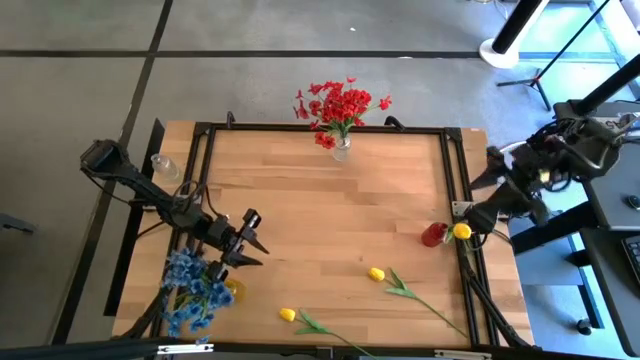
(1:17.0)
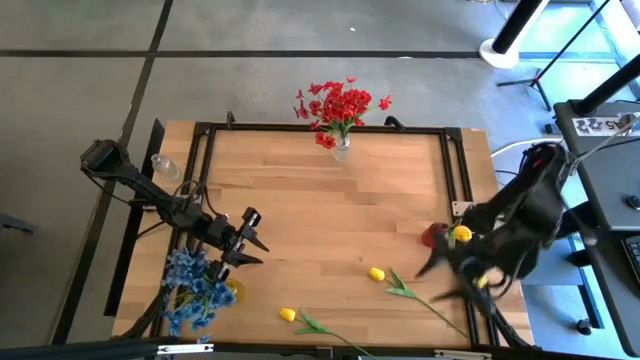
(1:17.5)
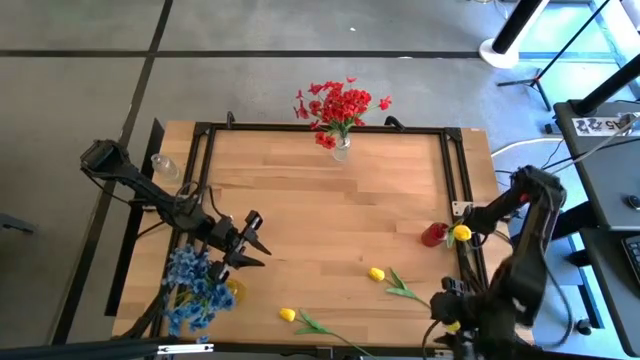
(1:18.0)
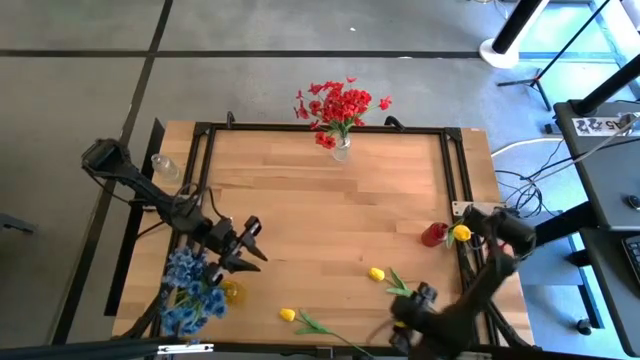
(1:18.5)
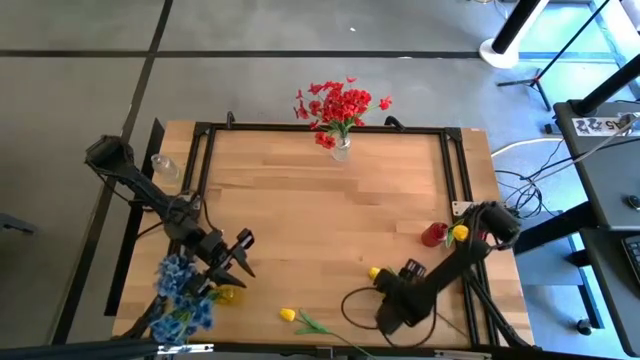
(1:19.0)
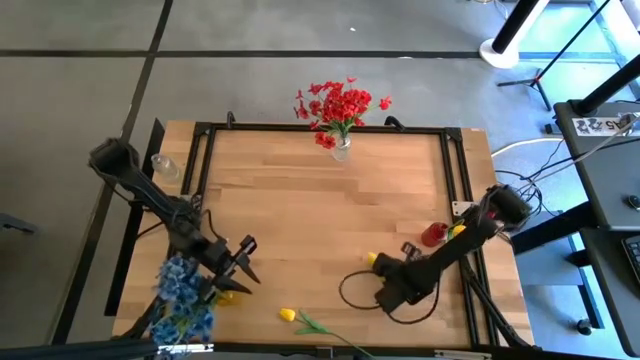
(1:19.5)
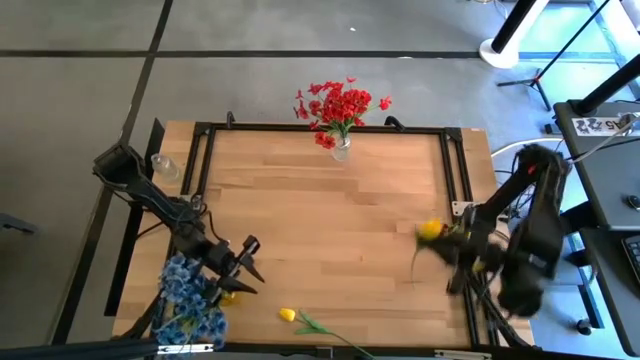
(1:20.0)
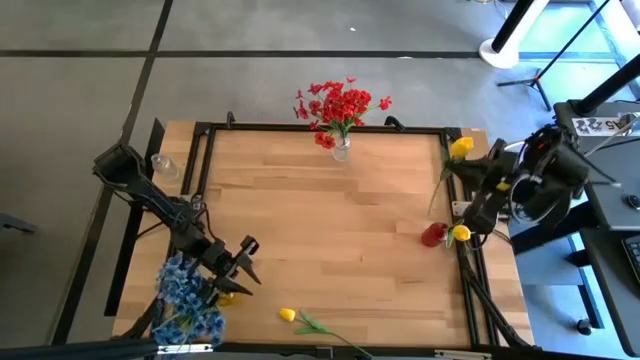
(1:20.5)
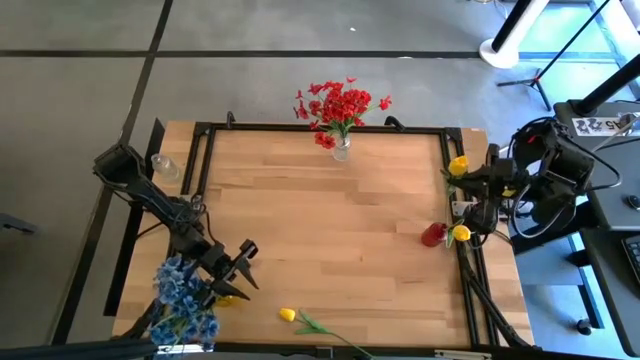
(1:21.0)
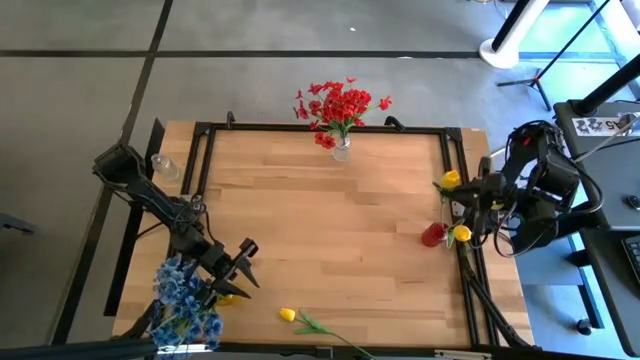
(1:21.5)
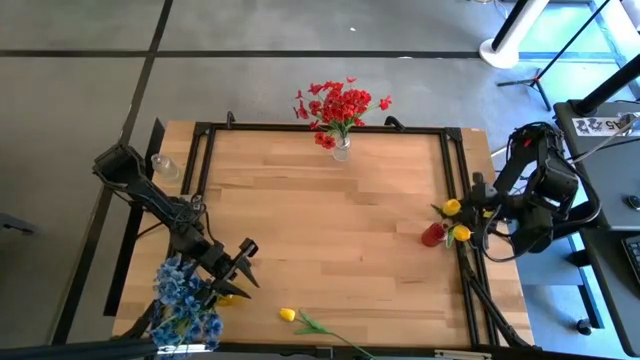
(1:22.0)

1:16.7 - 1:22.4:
Task: Sort flowers into vase by color
Put the right yellow flower into the red vase

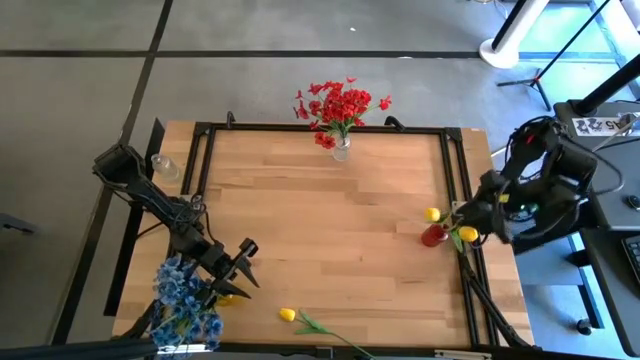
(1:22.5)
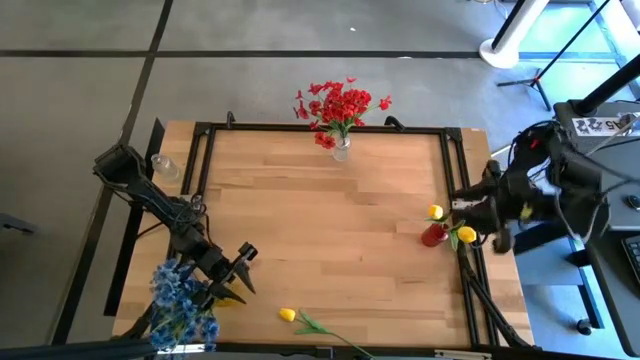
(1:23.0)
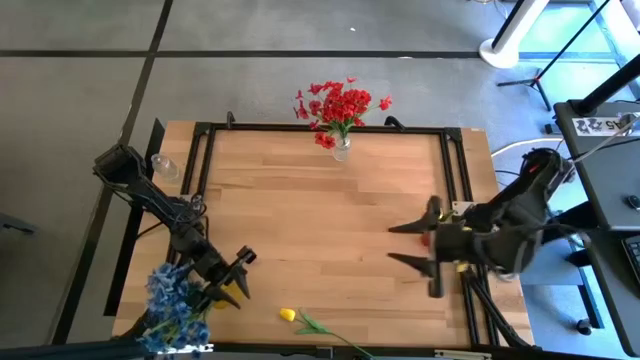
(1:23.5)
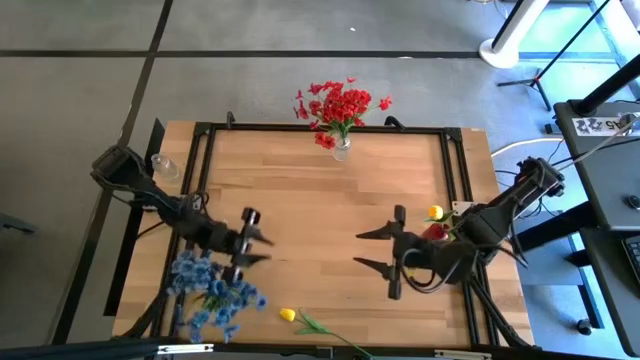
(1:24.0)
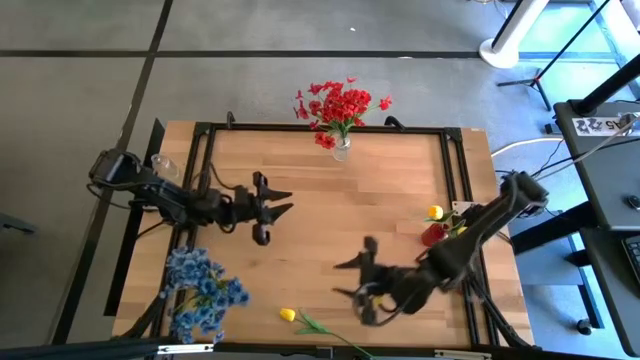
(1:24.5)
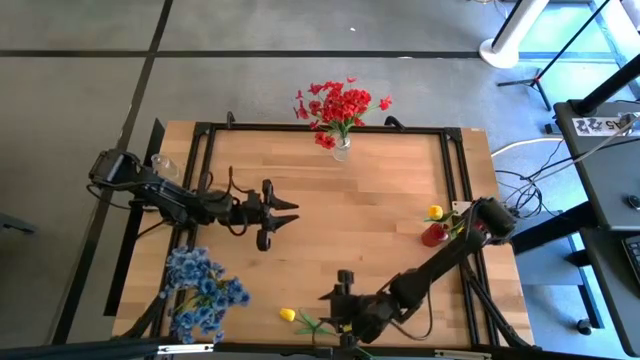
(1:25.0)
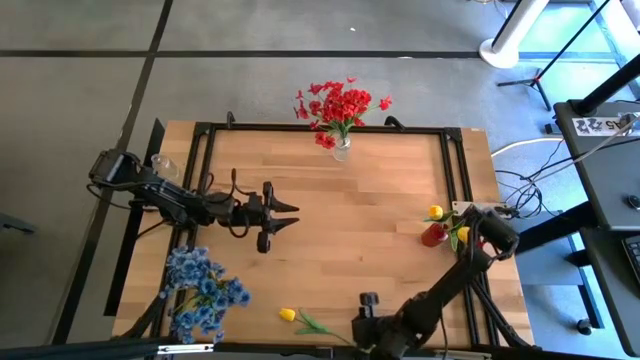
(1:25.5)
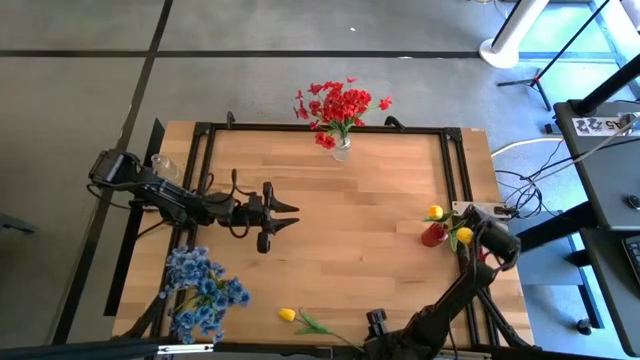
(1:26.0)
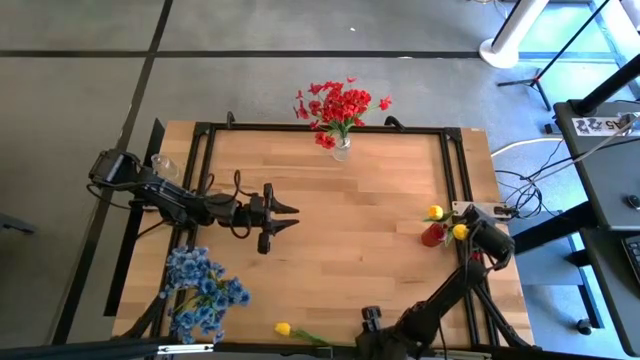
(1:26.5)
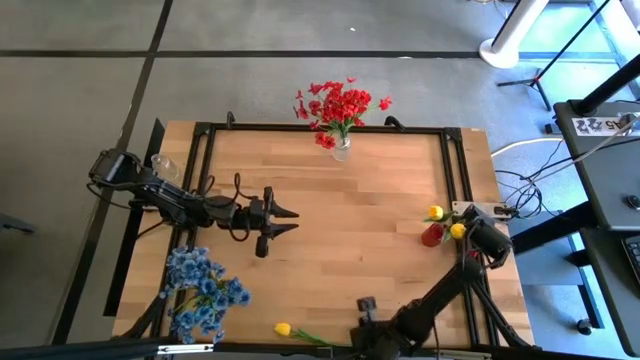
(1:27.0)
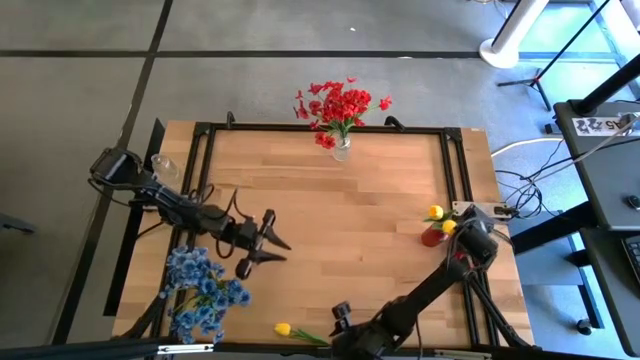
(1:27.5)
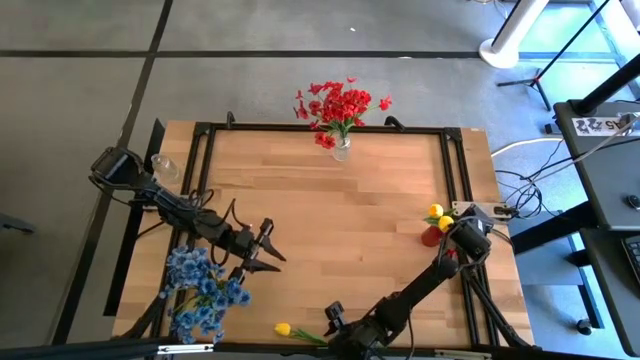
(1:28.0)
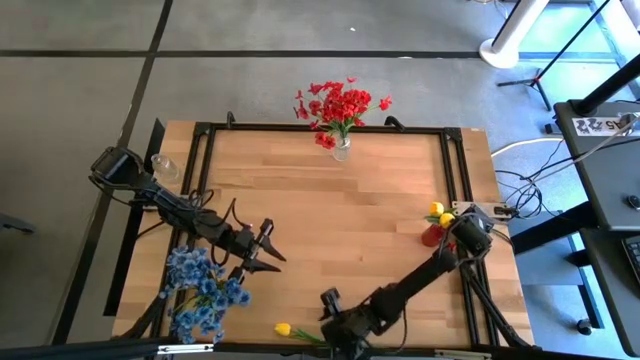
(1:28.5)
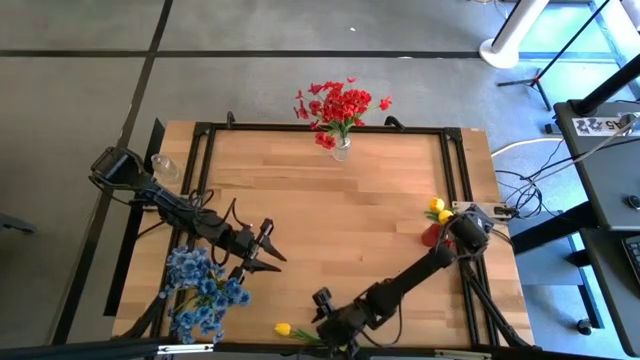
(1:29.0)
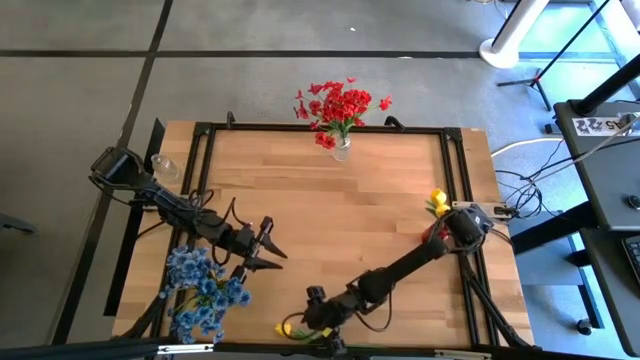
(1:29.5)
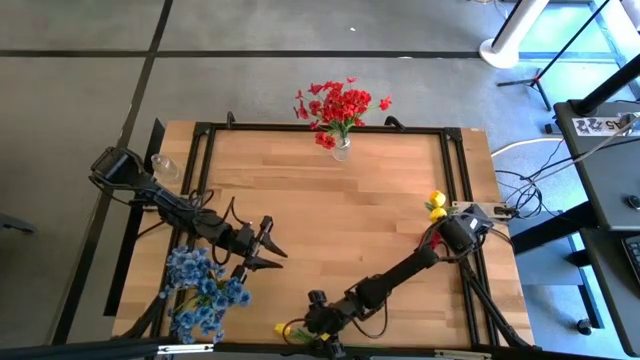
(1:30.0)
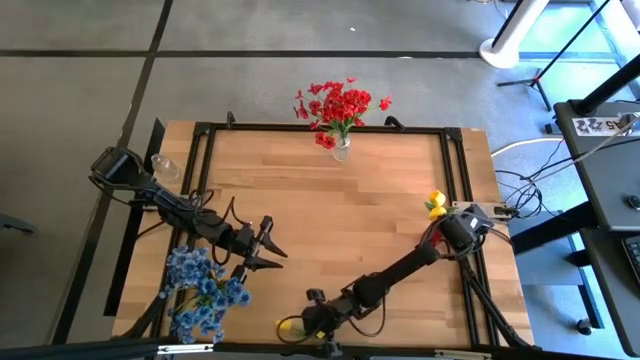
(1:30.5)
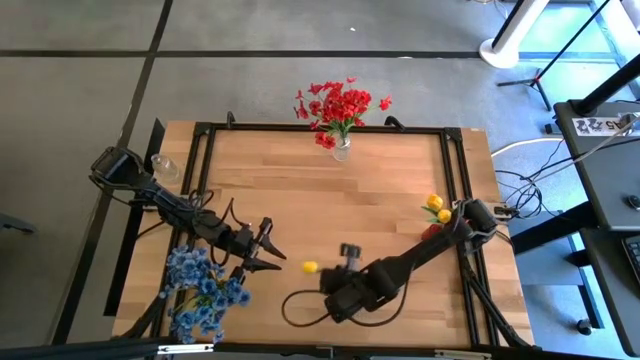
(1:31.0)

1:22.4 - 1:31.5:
Put the yellow flower into the red vase

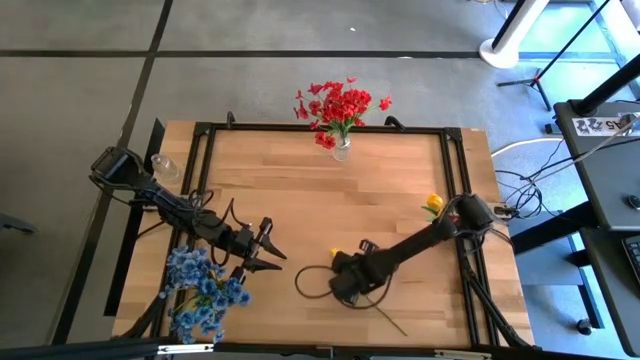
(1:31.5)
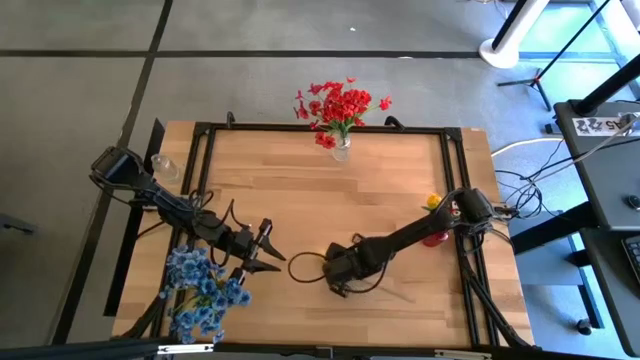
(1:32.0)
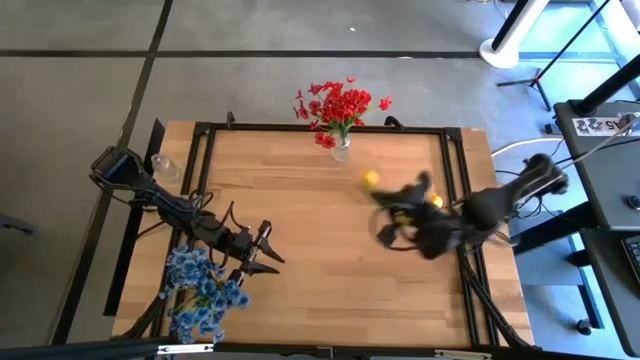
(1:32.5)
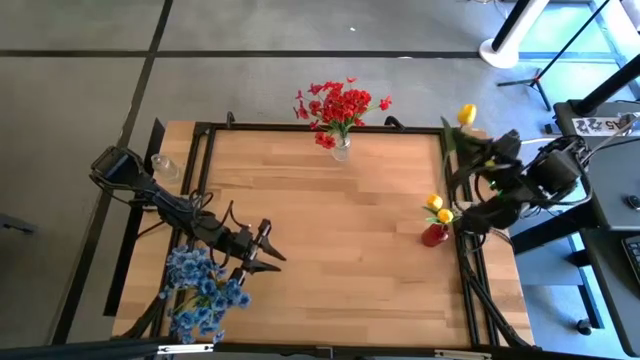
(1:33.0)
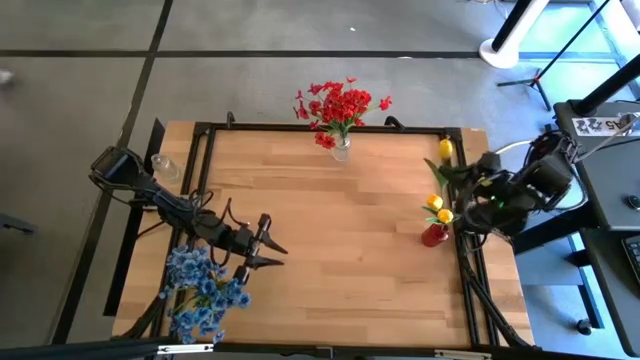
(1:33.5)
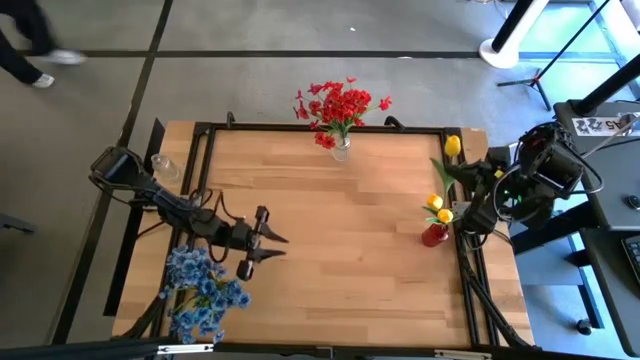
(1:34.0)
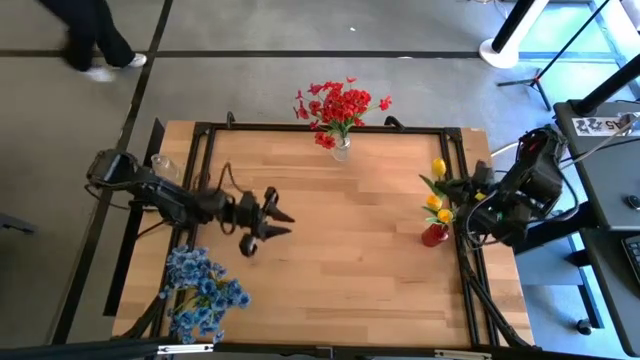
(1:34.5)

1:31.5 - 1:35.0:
Put the yellow flower into the red vase

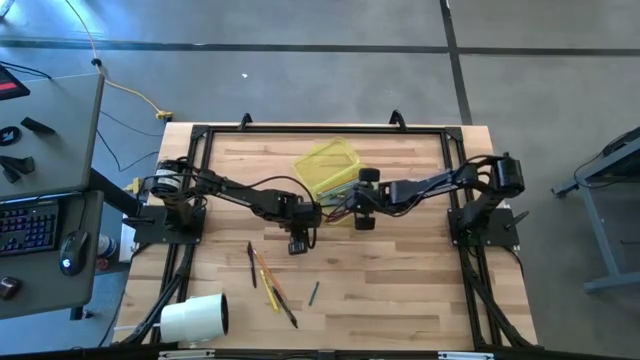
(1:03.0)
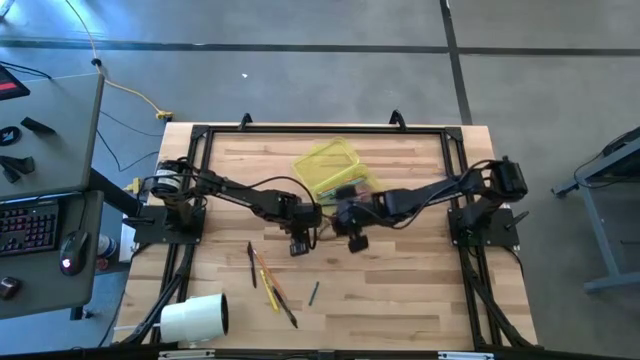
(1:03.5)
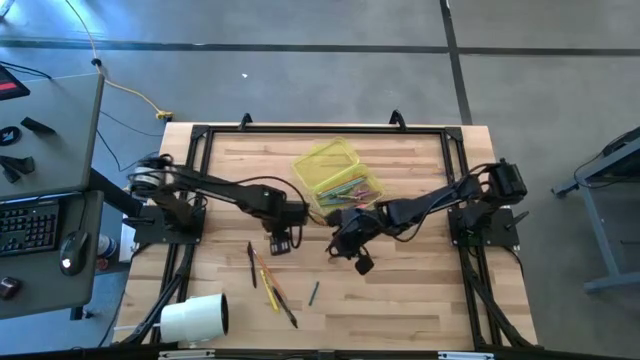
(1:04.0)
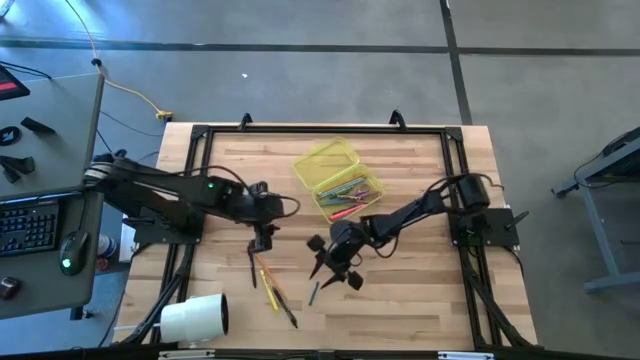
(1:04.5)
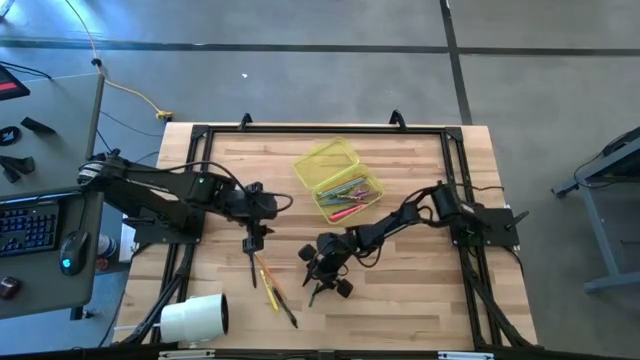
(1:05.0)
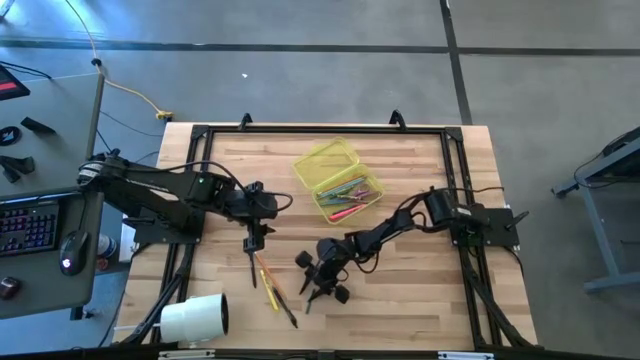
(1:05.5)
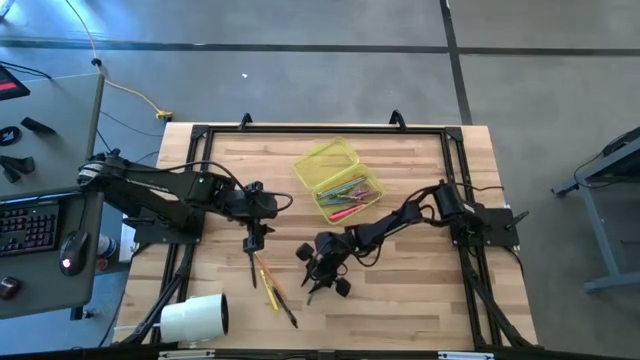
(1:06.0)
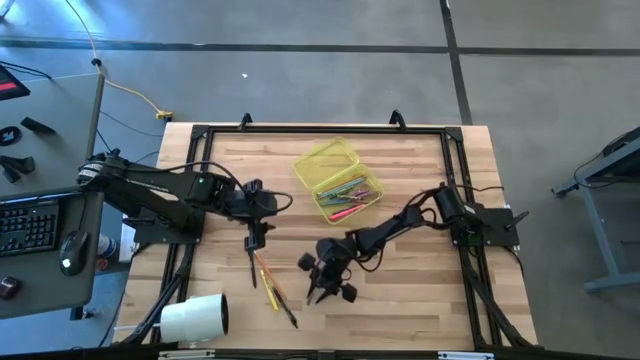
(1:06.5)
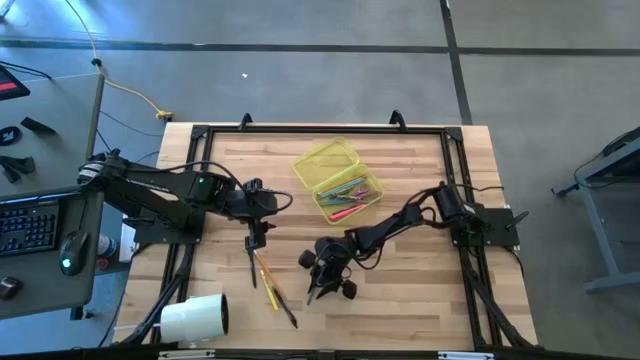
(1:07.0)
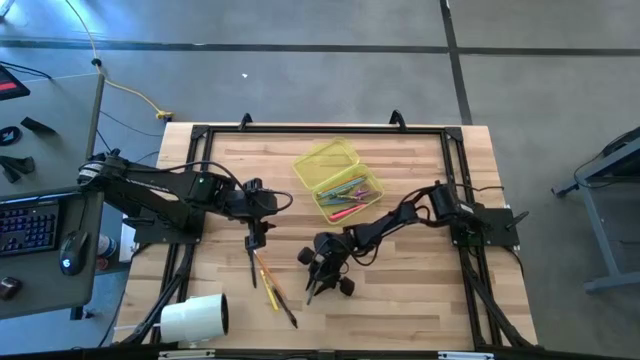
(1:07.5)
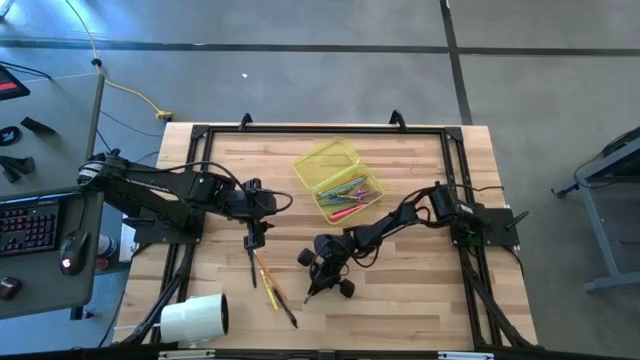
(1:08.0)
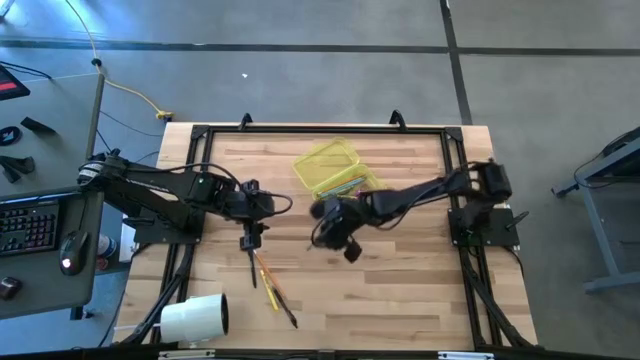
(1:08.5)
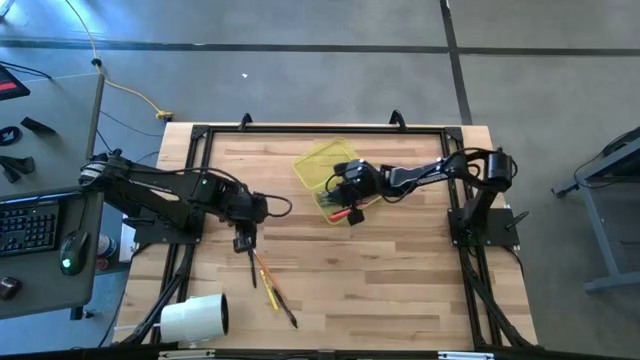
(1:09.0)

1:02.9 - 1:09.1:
Task: Pick & place school supplies into a supply box
Put the blue crayon into the supply box
